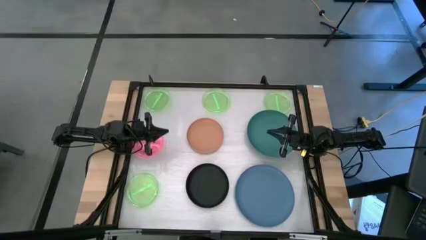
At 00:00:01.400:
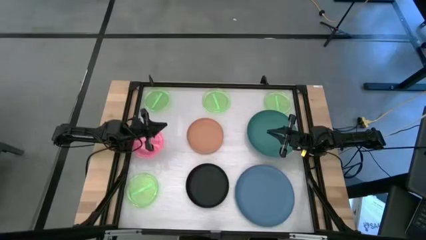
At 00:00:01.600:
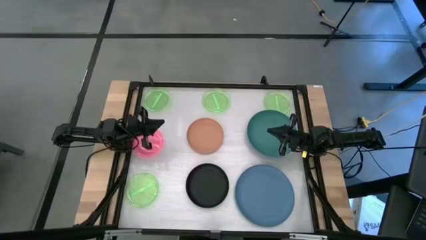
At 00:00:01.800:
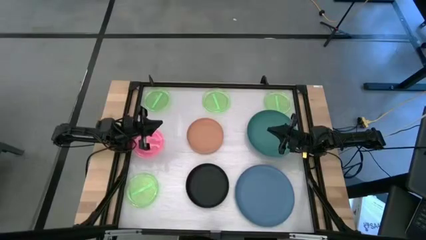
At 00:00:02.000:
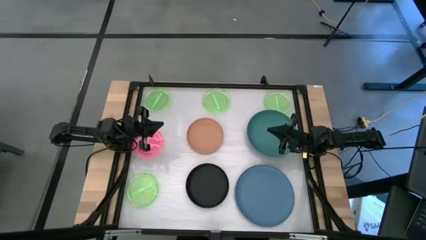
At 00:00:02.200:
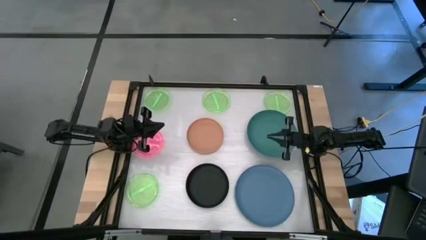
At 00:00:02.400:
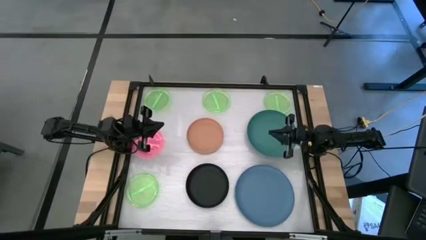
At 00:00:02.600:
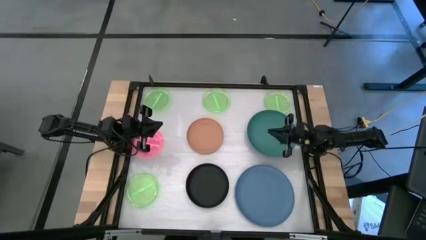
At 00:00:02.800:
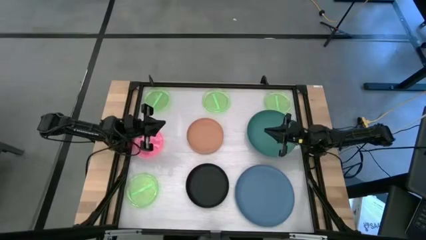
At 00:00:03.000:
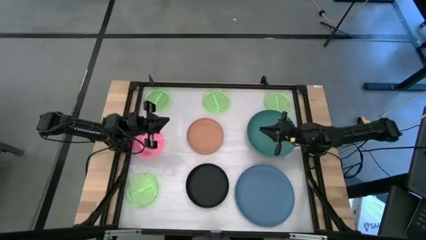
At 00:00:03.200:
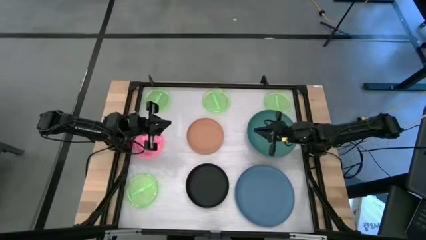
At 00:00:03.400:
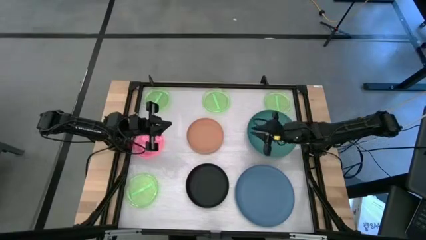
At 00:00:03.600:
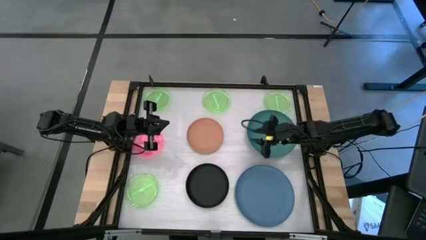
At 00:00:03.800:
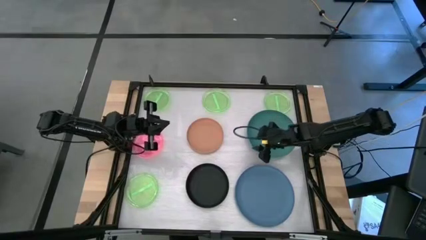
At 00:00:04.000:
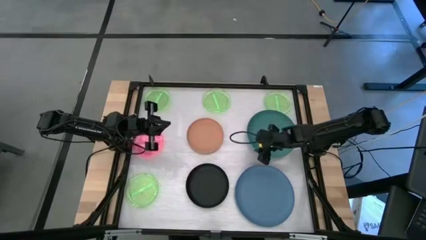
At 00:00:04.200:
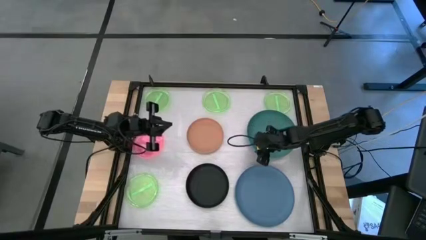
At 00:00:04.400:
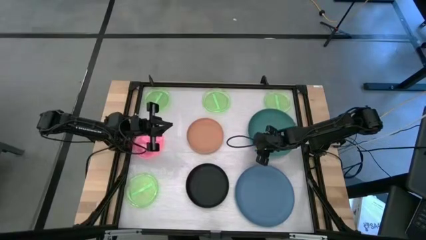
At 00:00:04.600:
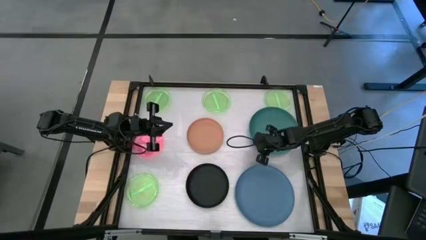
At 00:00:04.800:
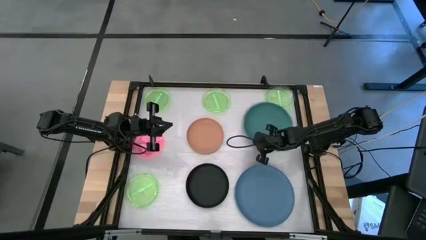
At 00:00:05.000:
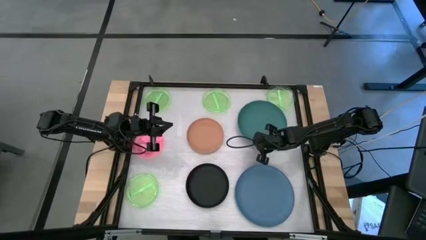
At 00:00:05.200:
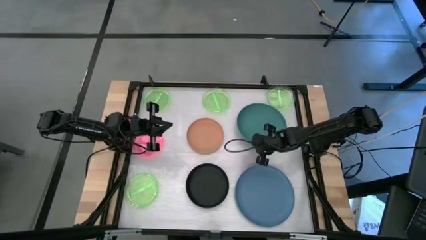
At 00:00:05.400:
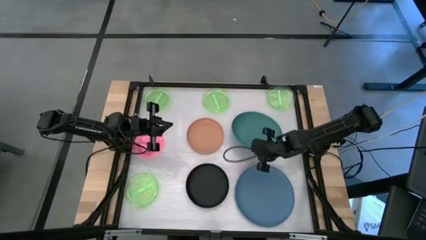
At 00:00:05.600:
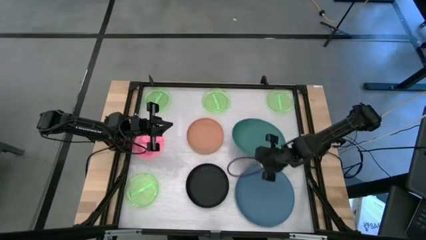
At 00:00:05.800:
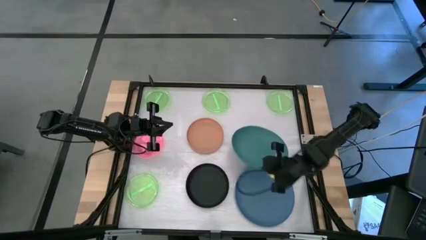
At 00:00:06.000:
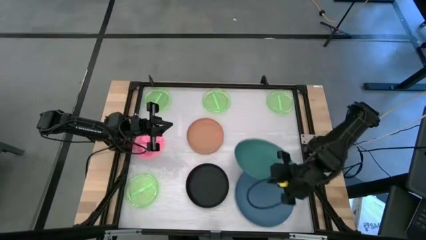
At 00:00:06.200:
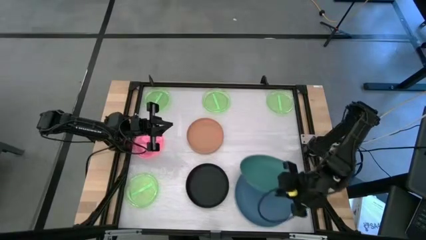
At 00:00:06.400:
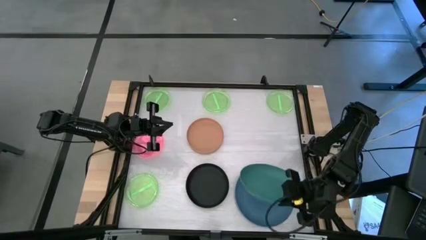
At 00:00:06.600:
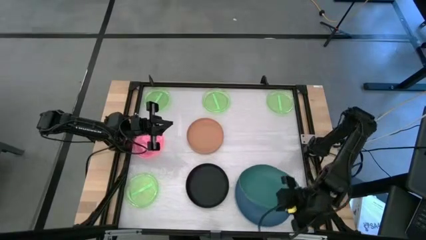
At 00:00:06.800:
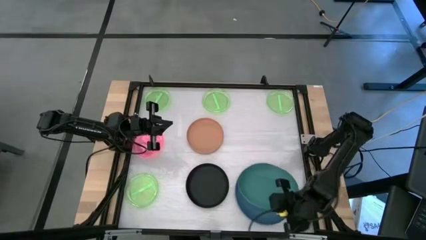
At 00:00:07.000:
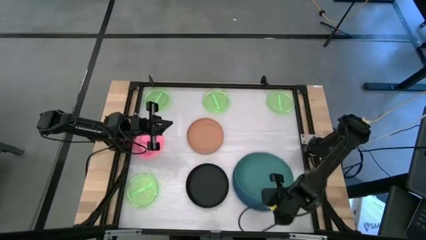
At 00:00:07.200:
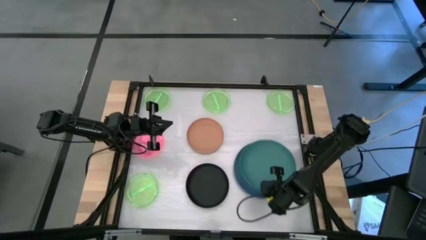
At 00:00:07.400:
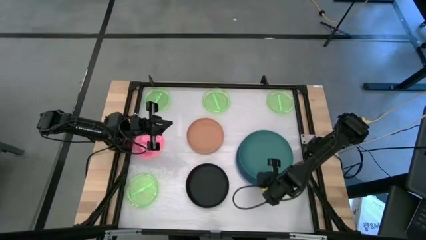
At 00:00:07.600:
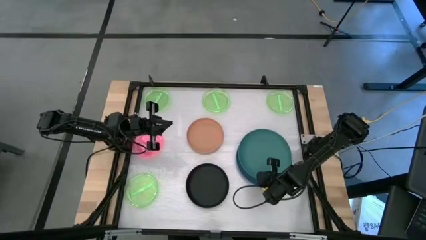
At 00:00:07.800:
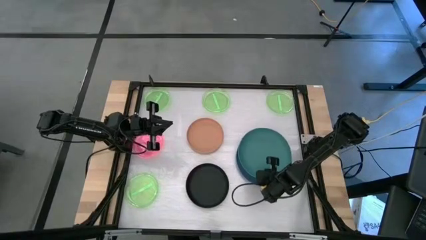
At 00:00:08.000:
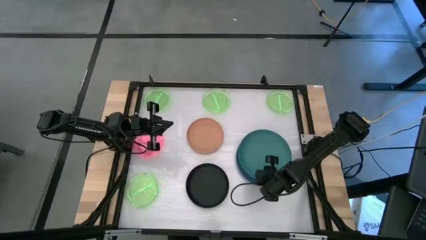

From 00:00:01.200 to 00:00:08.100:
Task: Stack plastic plates
Stack the green plate on top of the blue plate

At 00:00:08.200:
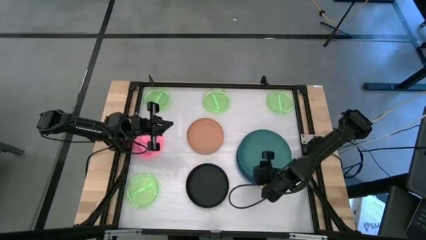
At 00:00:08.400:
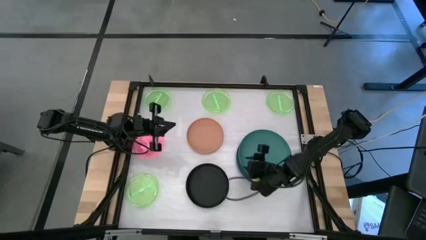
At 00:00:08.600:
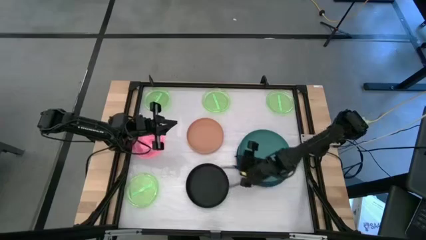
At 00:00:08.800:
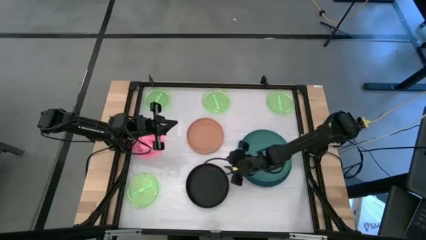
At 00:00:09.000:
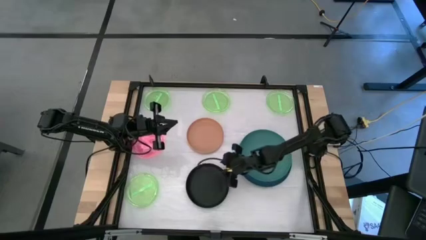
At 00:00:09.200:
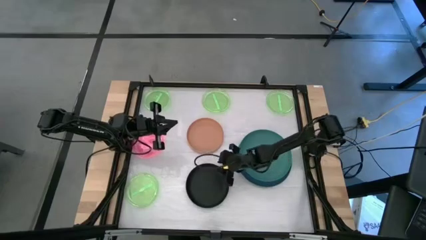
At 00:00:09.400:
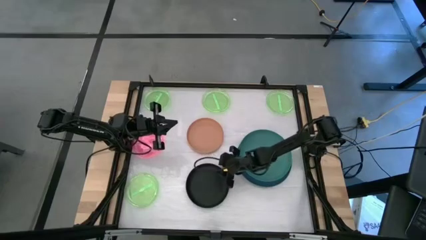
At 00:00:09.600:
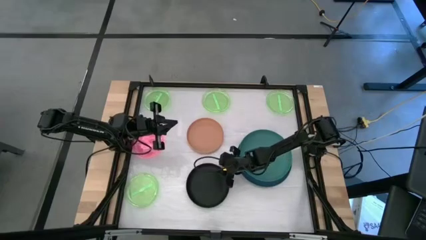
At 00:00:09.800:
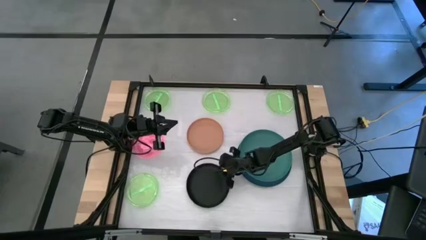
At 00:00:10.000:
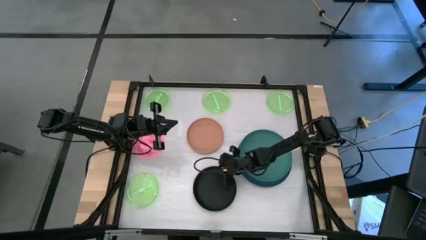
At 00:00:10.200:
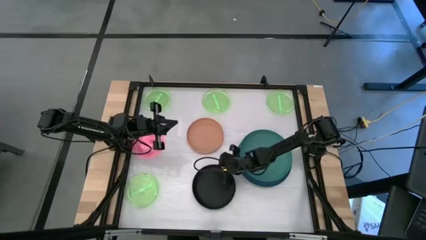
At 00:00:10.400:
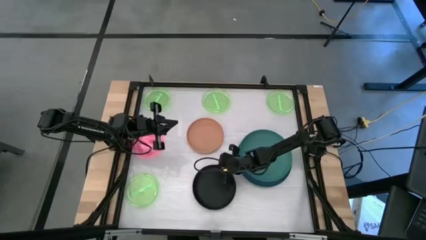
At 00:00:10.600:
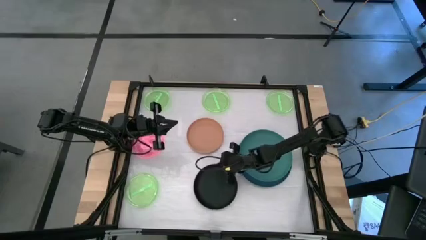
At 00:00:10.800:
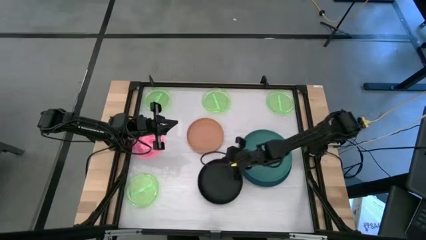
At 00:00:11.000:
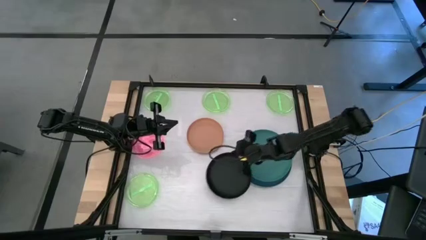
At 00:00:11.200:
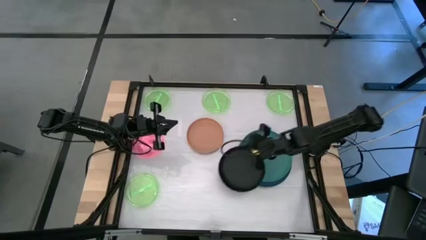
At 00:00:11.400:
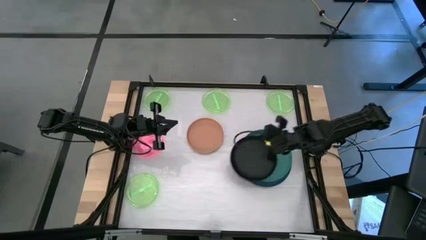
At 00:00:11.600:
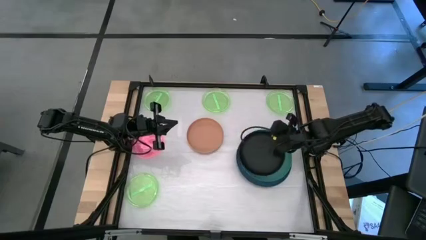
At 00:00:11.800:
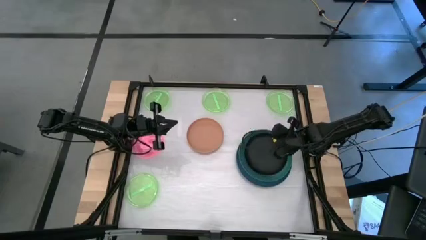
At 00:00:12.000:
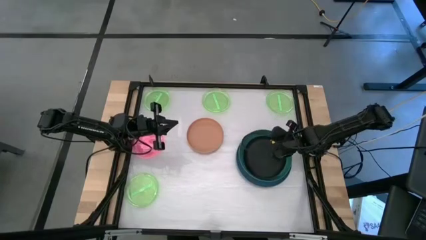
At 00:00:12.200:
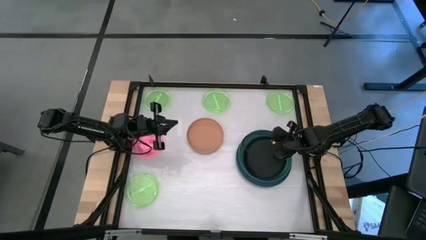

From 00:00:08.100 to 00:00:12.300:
Stack the black plate on top of the green plate

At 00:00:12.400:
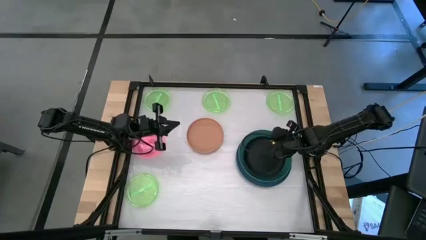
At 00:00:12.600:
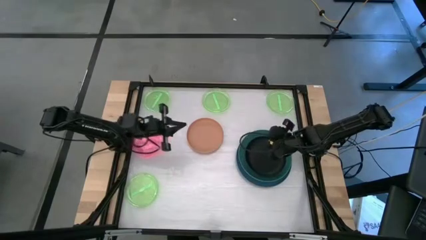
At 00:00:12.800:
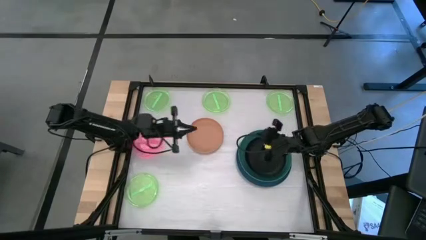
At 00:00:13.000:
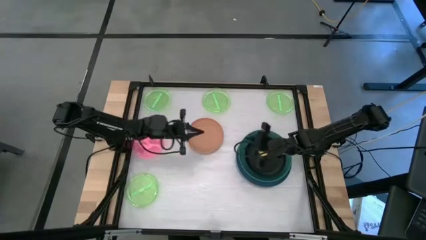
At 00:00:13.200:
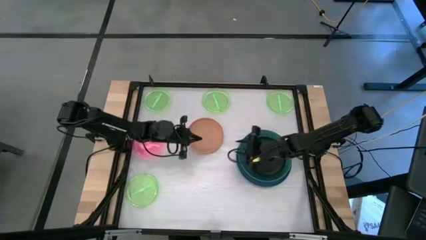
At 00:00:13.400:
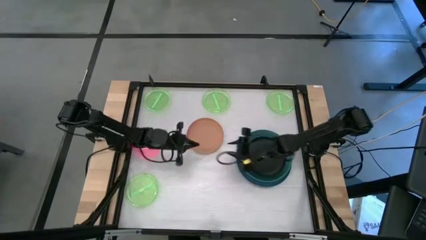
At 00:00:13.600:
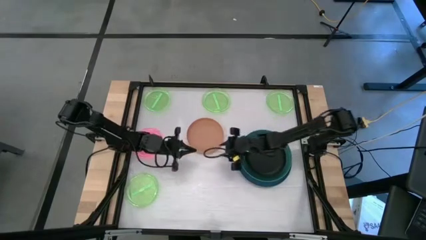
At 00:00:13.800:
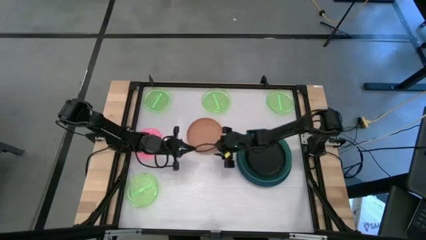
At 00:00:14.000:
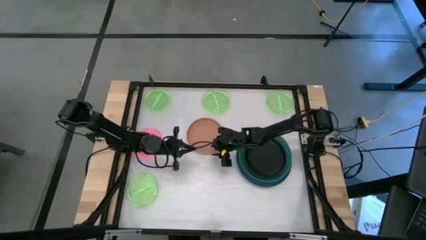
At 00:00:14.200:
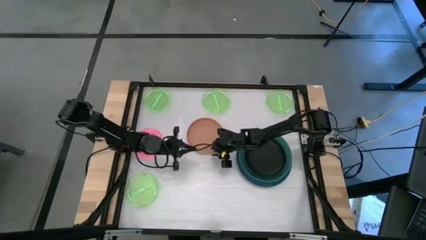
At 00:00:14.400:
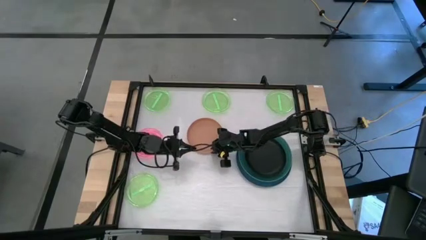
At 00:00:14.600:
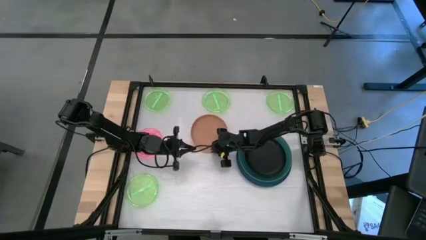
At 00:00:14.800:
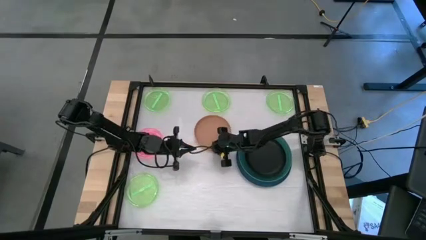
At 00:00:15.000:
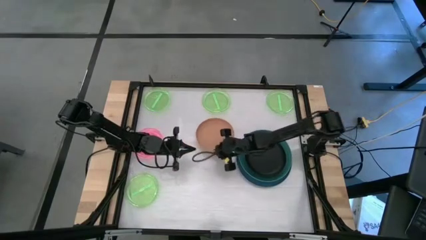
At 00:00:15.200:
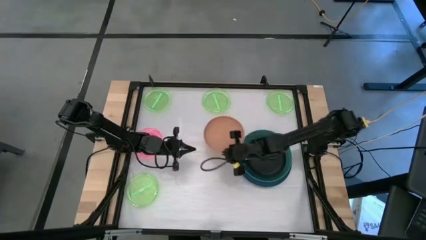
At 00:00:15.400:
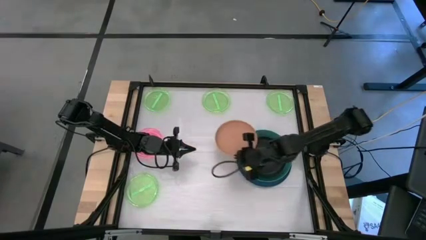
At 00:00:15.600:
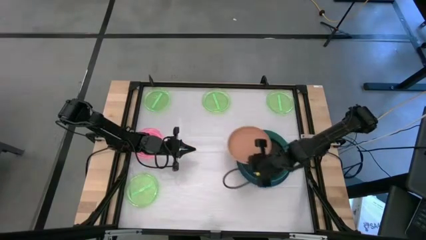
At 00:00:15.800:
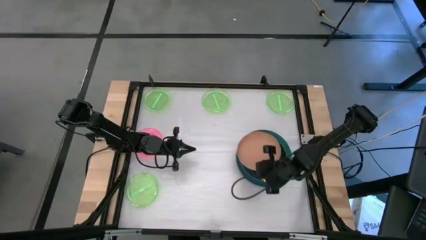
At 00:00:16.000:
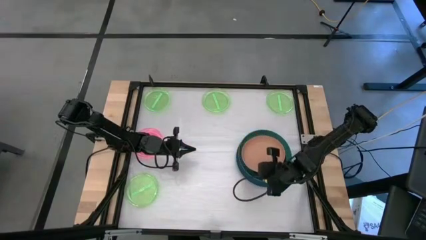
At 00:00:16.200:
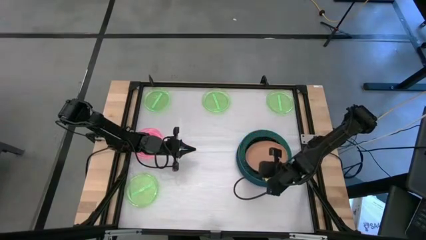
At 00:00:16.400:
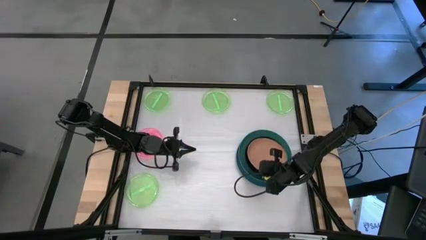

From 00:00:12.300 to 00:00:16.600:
Stack the orange plate on top of the black plate
